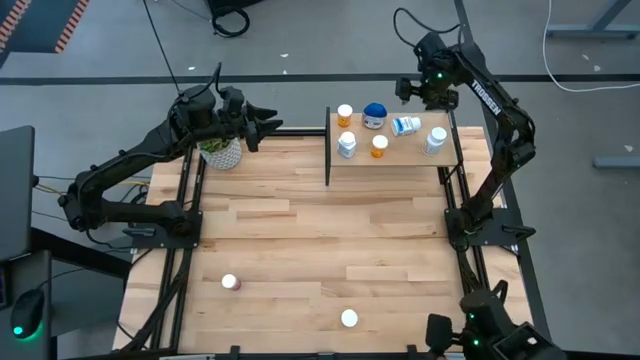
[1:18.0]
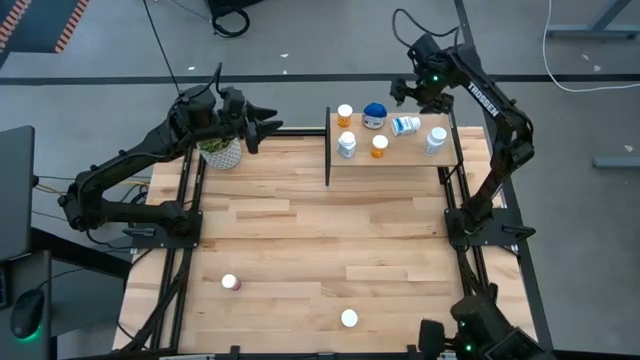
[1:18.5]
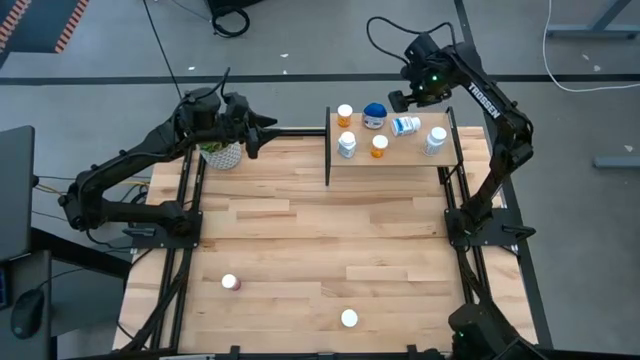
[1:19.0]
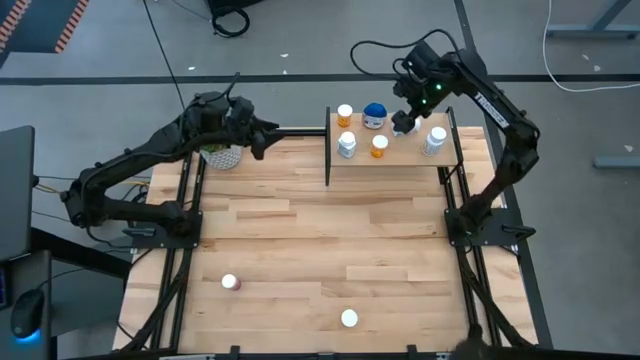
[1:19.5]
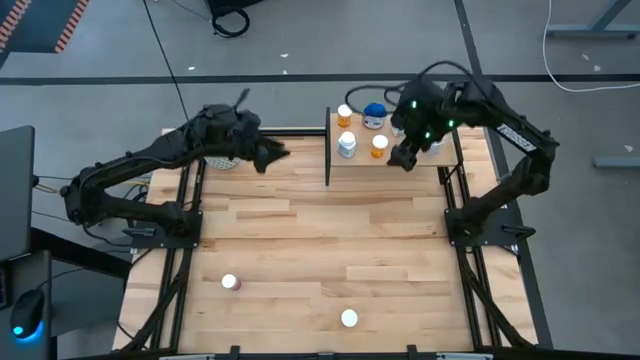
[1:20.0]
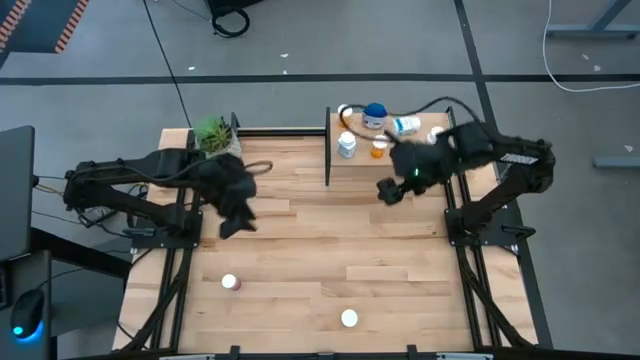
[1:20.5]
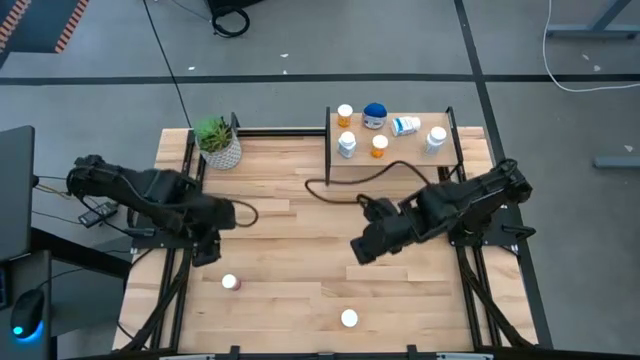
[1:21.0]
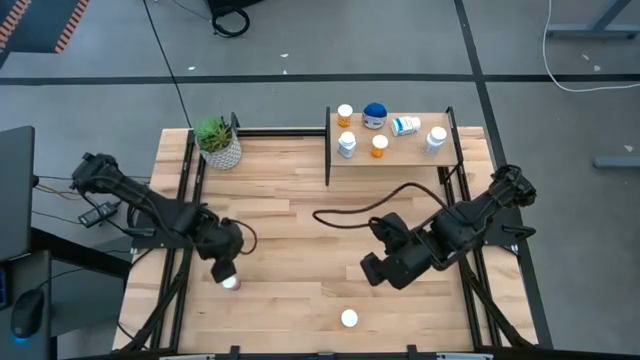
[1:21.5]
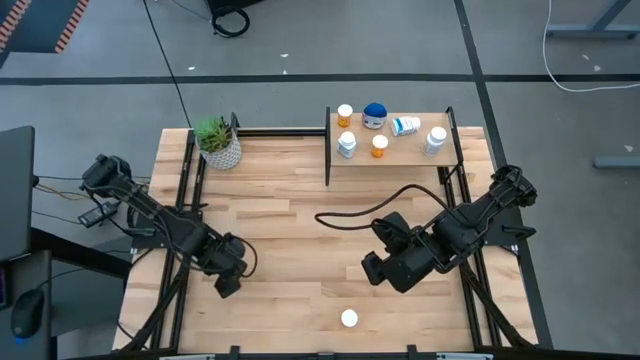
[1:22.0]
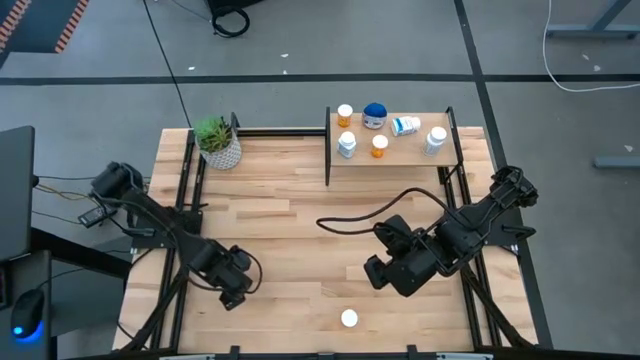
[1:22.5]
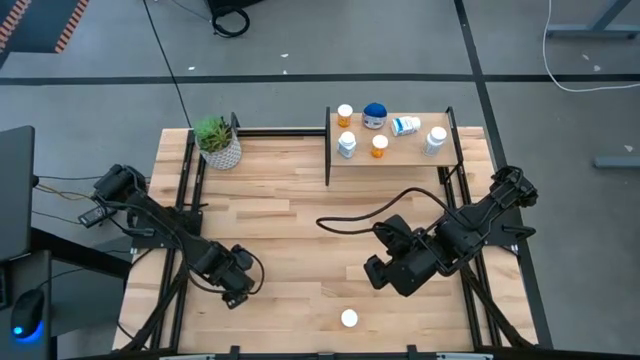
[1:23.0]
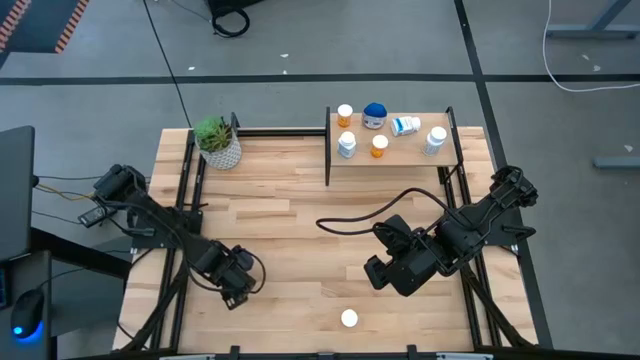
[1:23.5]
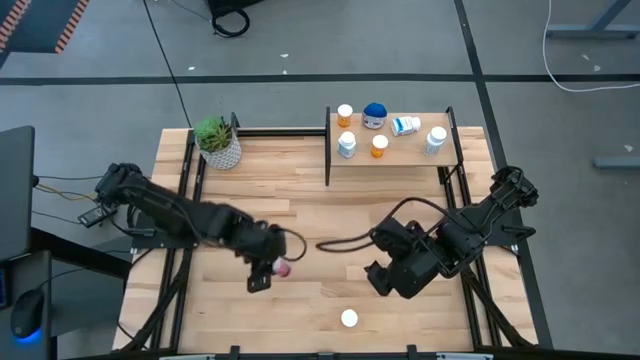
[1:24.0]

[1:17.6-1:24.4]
Task: Pick and place medicine bottles onto shelf by color
Put the pink pill bottle on the shelf

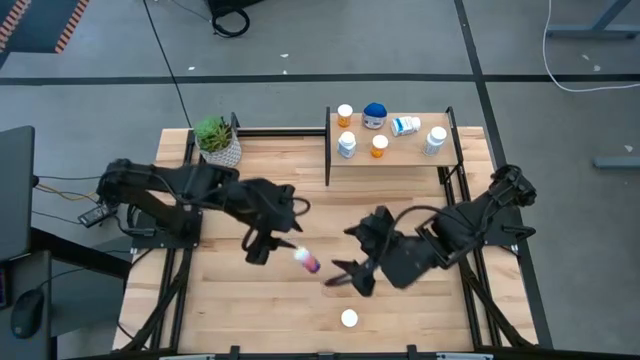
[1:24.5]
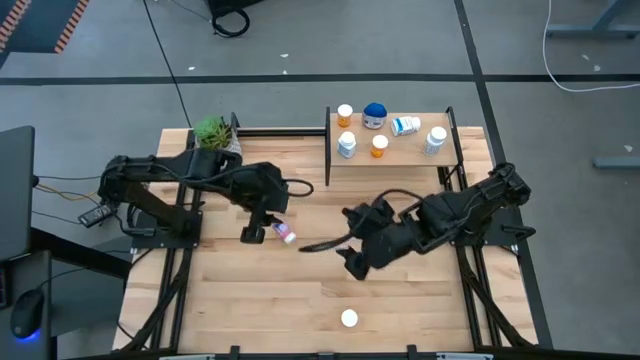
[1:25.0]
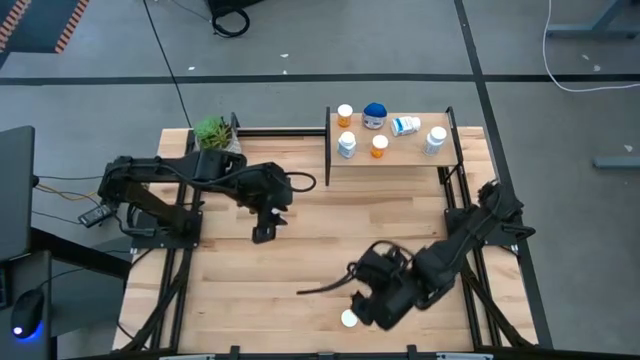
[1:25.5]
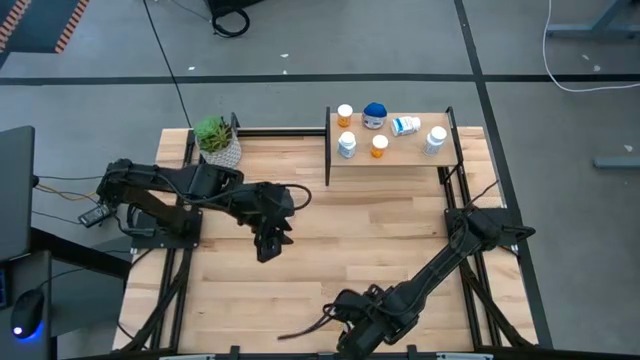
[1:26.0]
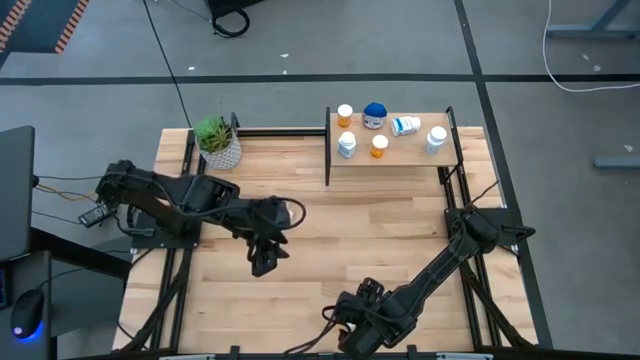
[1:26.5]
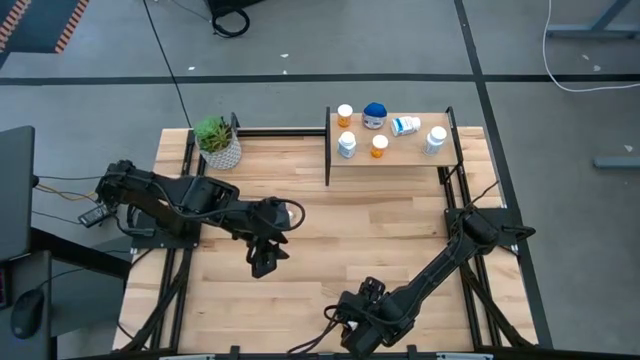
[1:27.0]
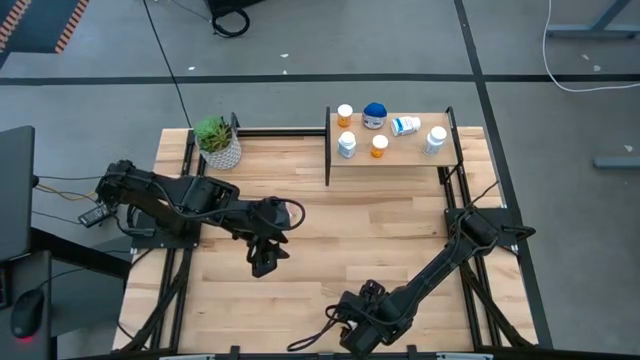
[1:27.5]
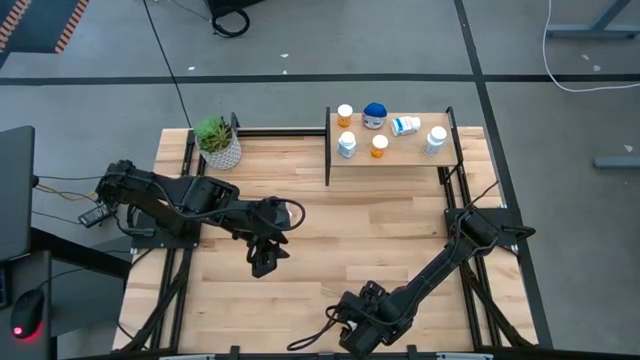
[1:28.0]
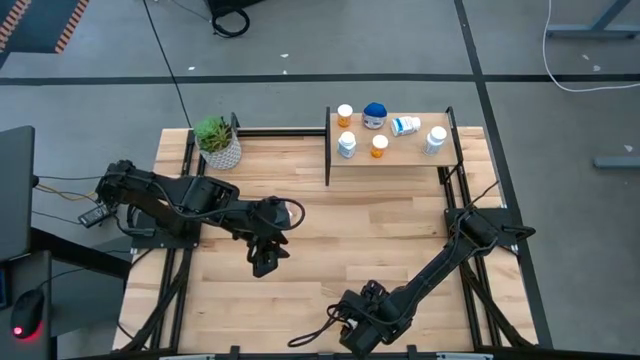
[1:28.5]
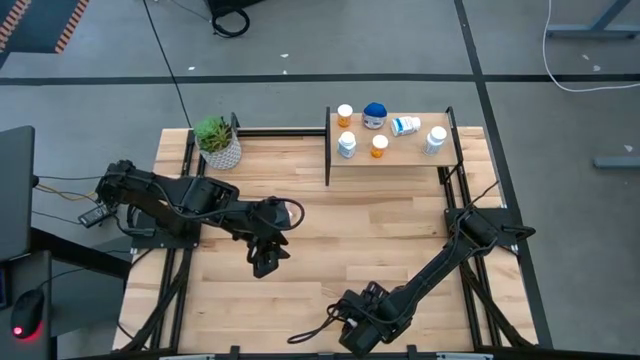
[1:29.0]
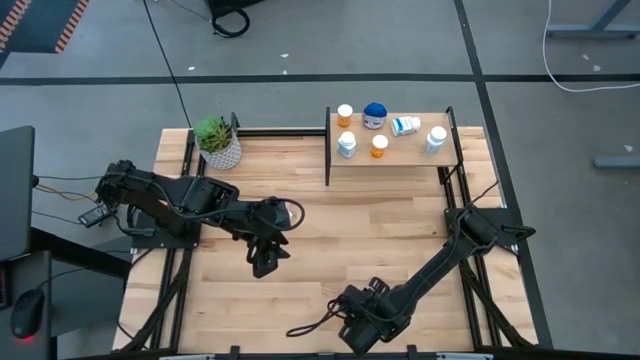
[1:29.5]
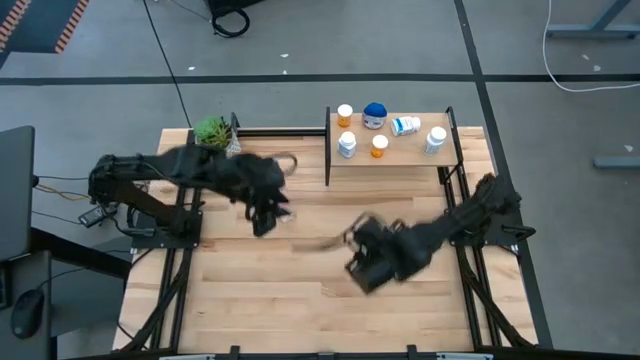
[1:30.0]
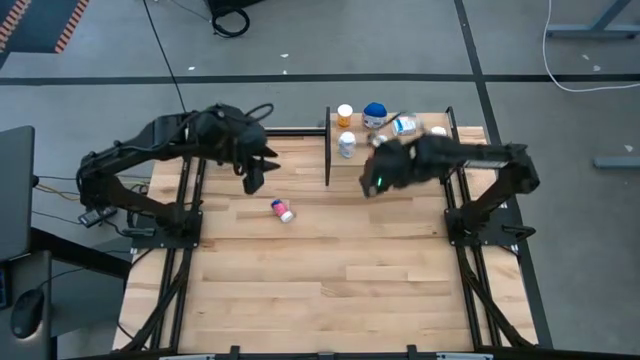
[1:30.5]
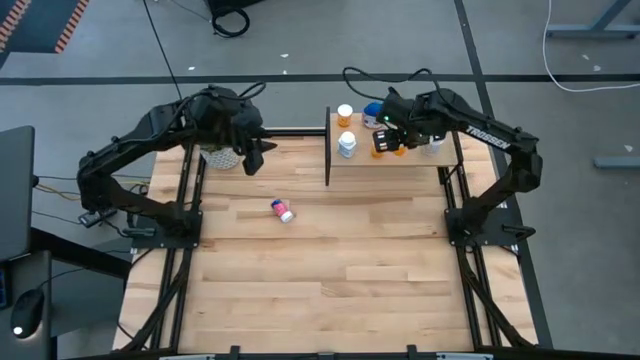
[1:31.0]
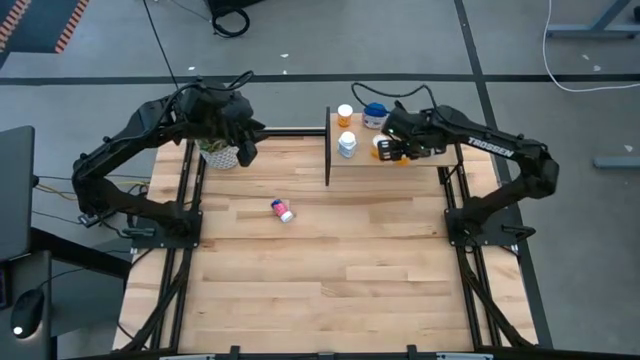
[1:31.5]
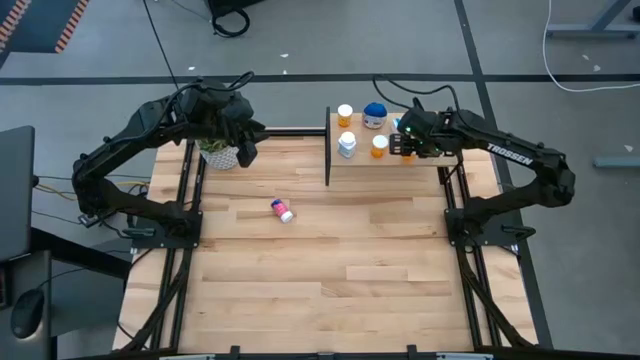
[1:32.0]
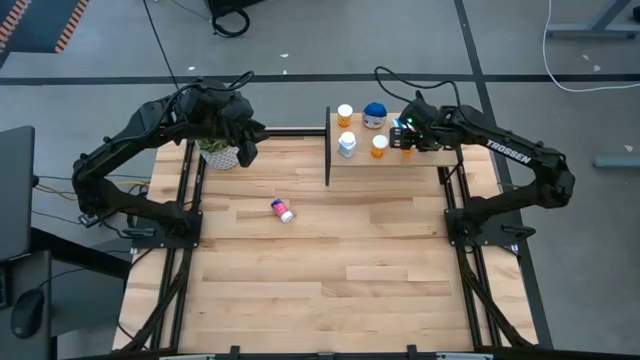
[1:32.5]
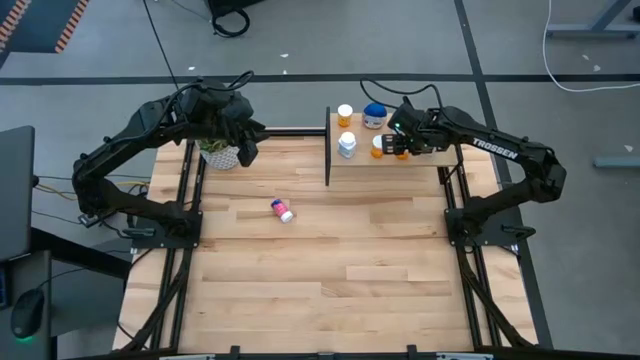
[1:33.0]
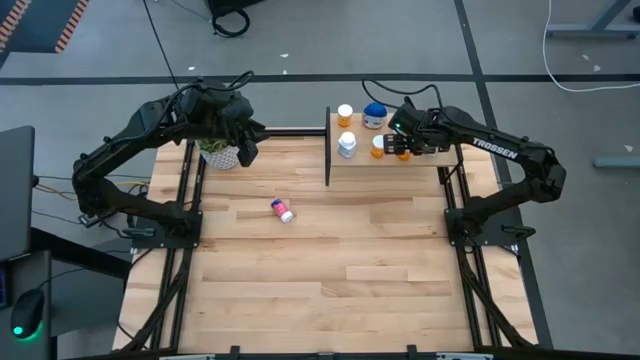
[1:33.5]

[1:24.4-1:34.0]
Put the orange pill bottle on the shelf

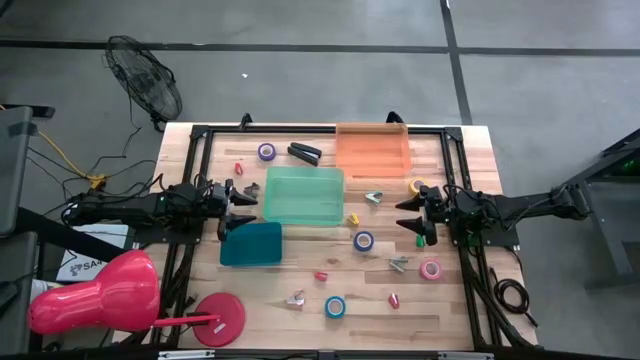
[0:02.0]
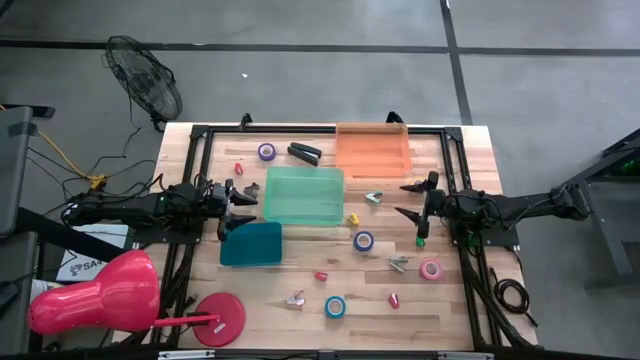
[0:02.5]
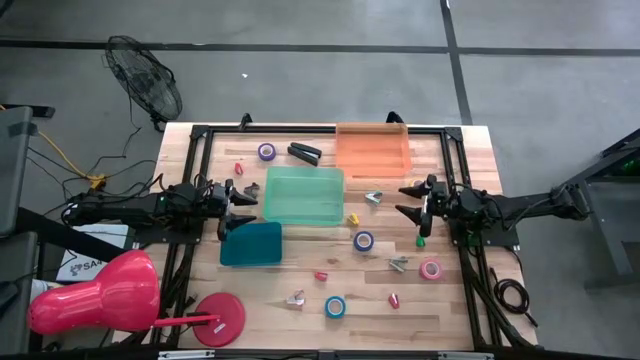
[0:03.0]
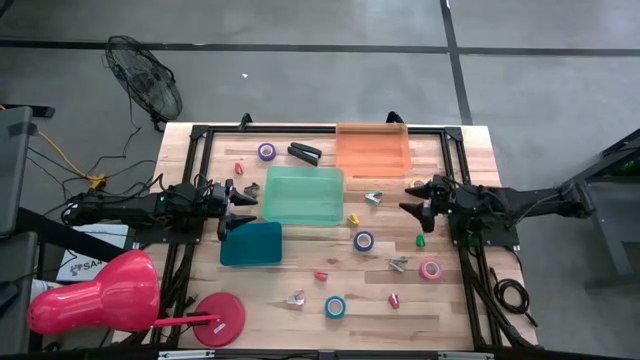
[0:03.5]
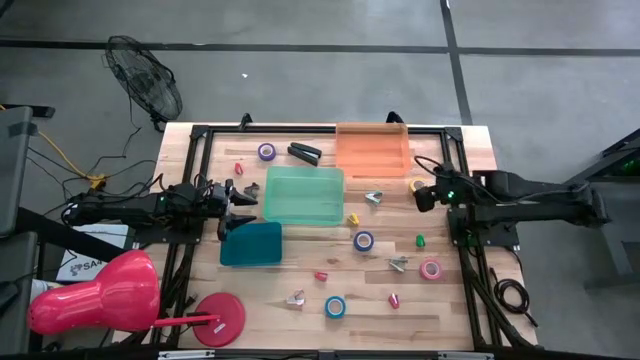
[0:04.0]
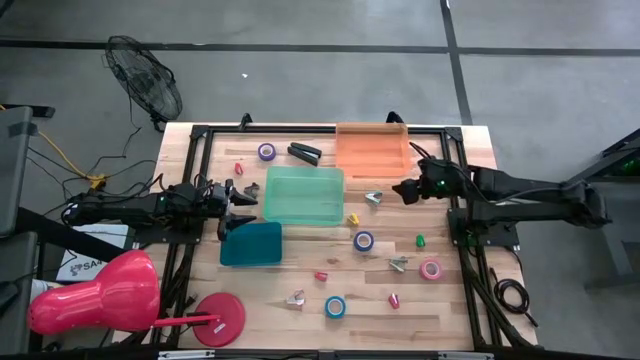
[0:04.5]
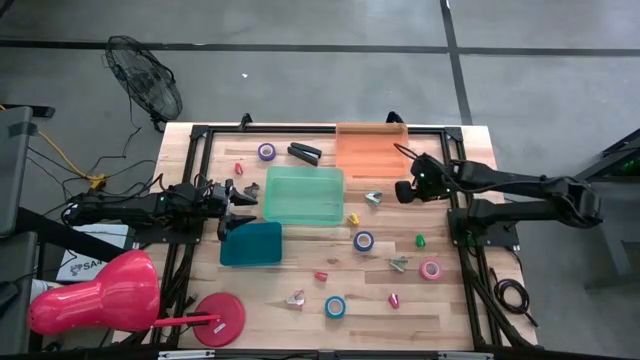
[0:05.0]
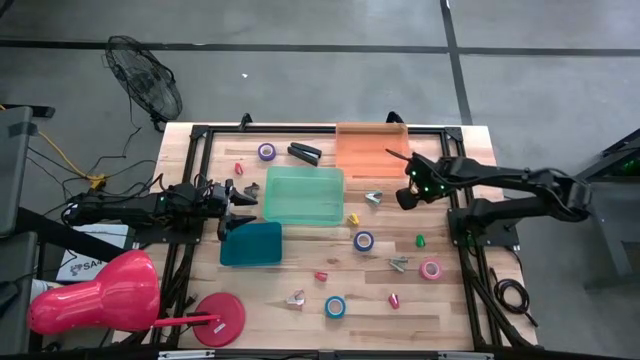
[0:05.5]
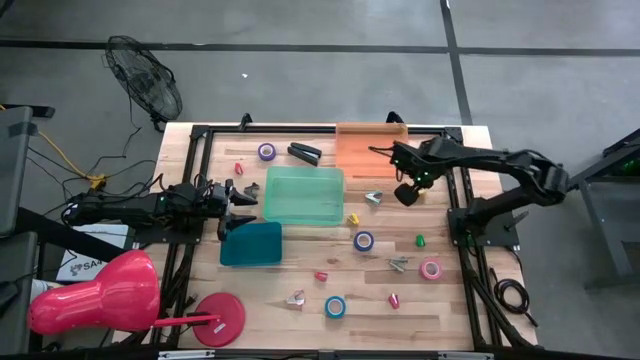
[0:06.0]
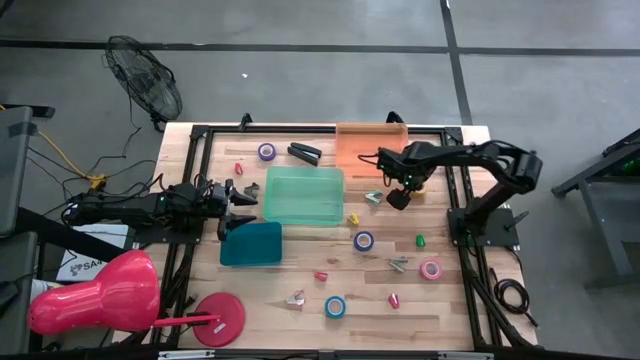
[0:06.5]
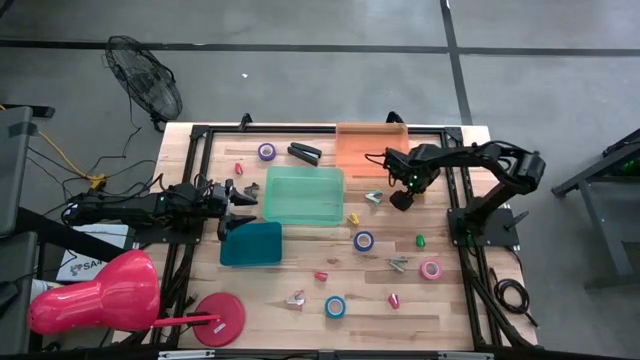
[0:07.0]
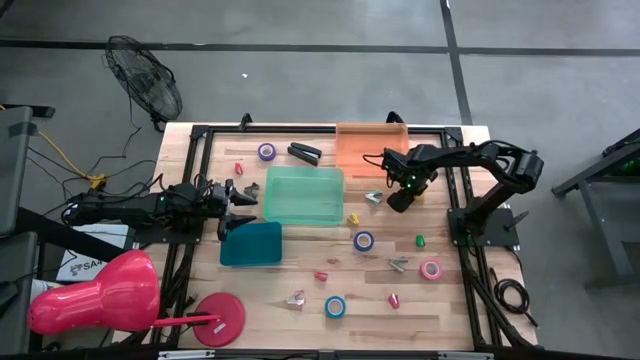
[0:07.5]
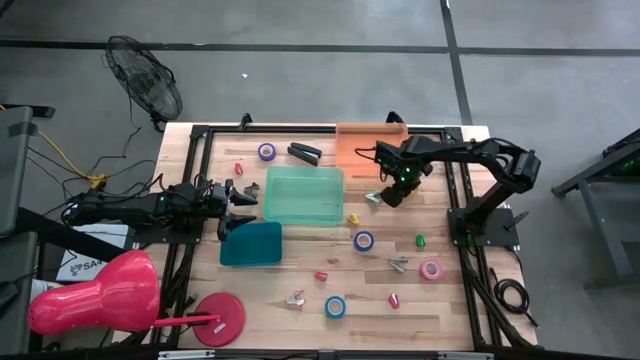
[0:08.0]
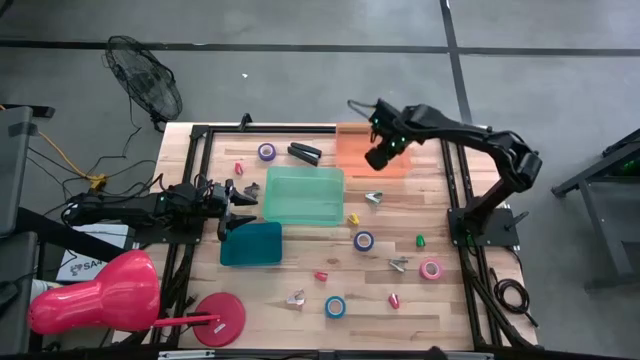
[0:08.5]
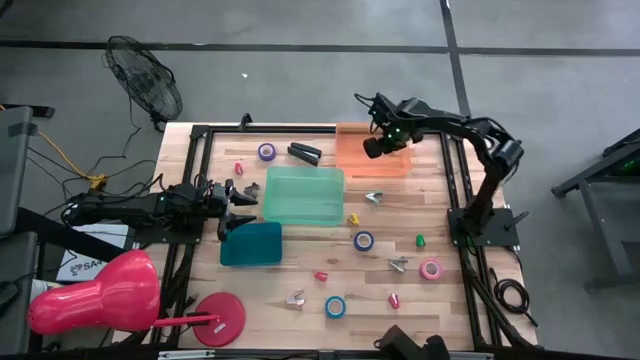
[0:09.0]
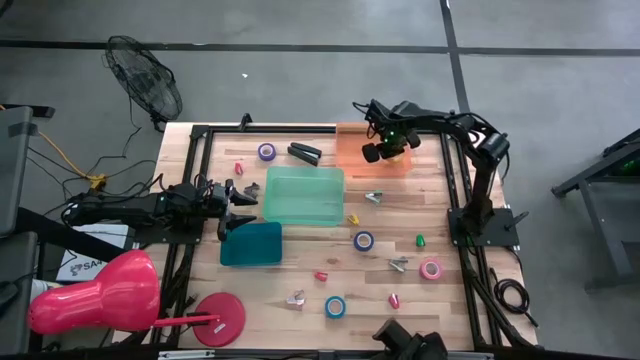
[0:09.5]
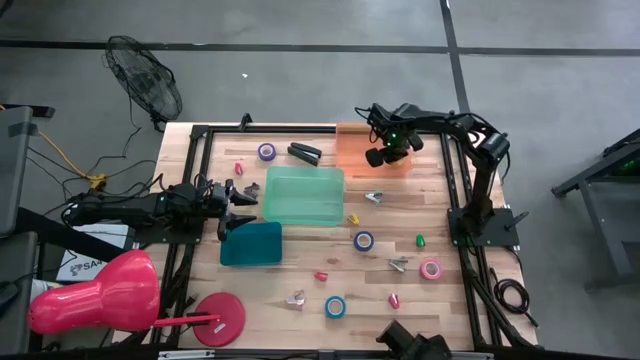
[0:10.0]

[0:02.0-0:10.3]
Task: Pick and place Stapler, Stapler remover, tape
Put the yellow tape in the orange bin
